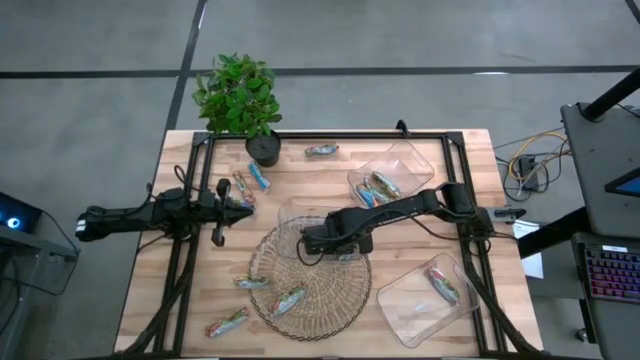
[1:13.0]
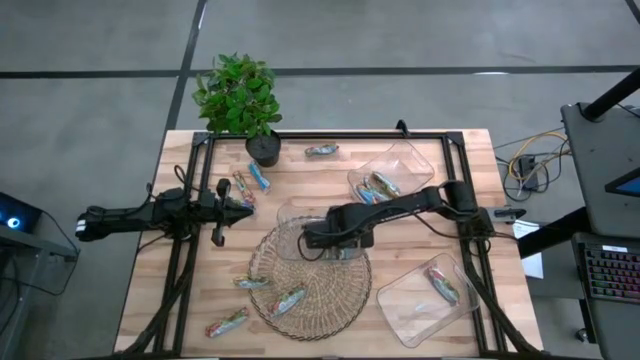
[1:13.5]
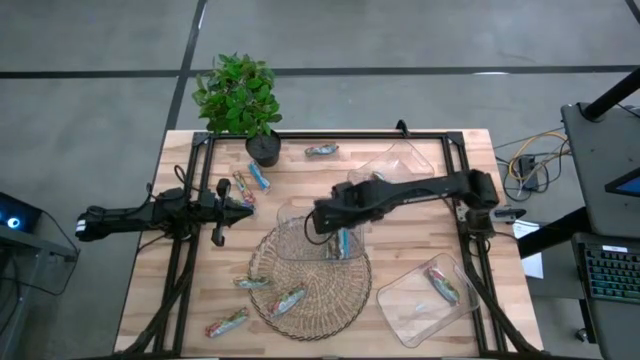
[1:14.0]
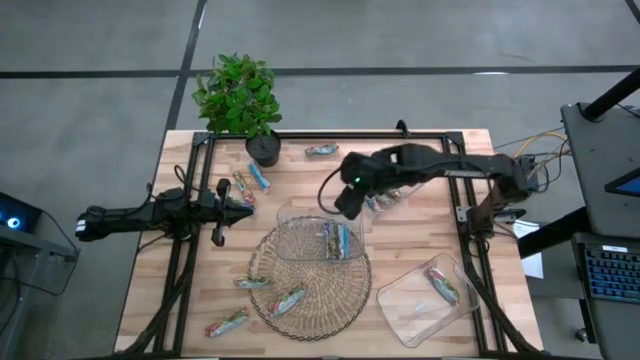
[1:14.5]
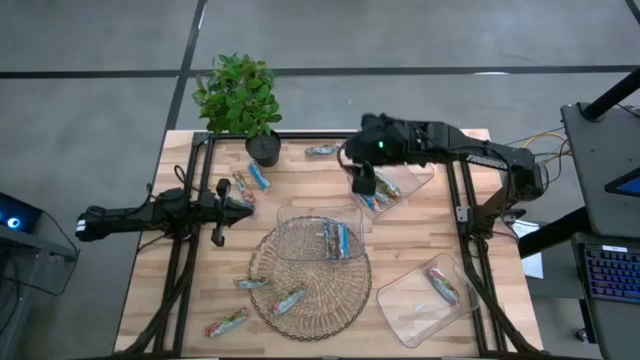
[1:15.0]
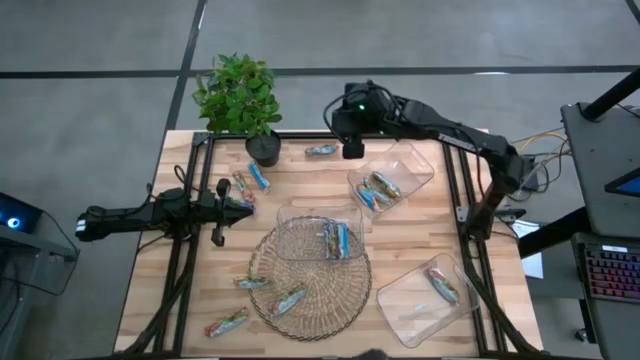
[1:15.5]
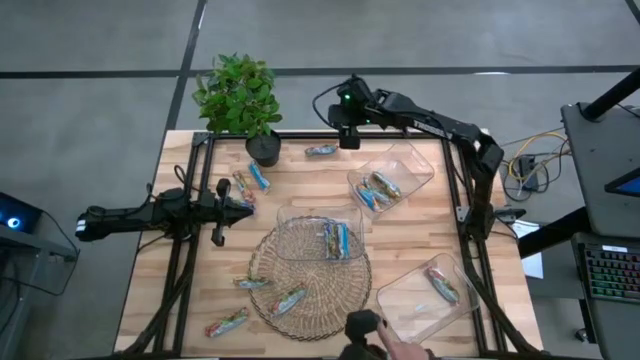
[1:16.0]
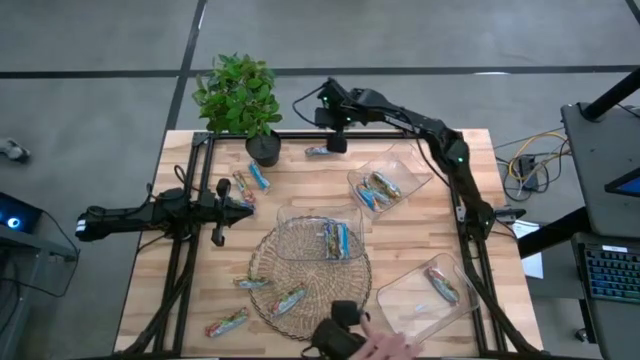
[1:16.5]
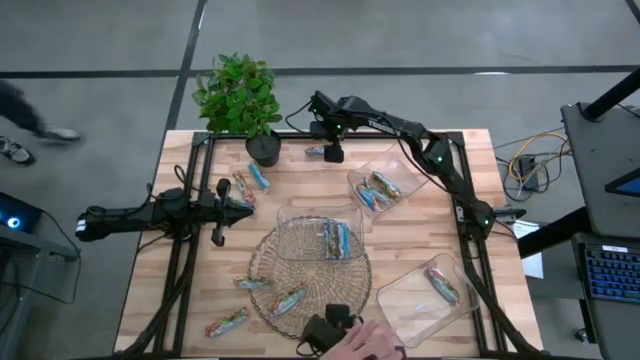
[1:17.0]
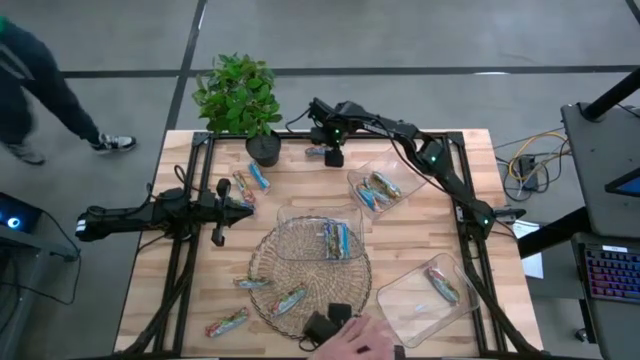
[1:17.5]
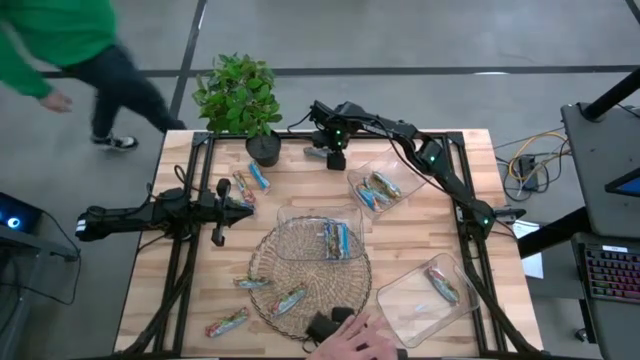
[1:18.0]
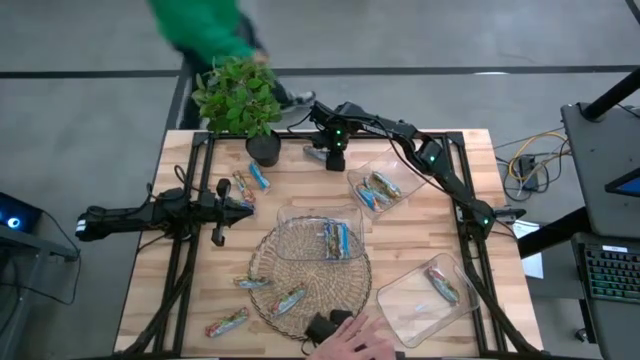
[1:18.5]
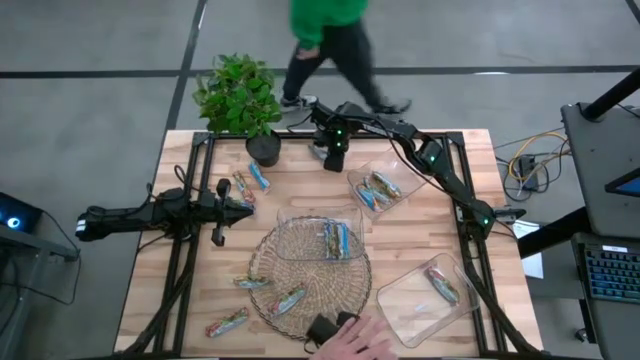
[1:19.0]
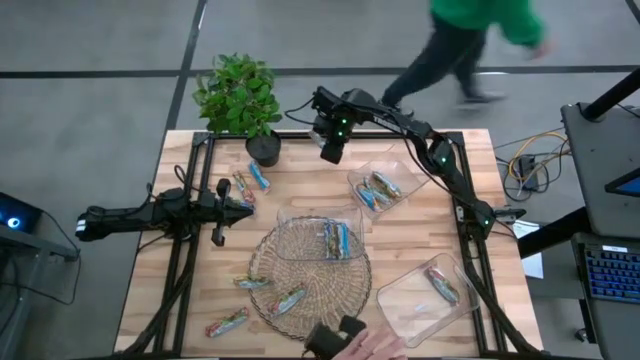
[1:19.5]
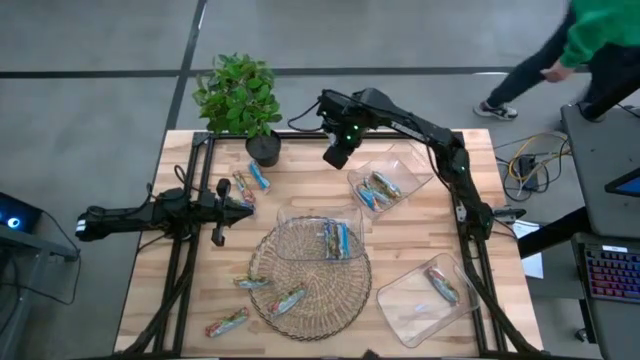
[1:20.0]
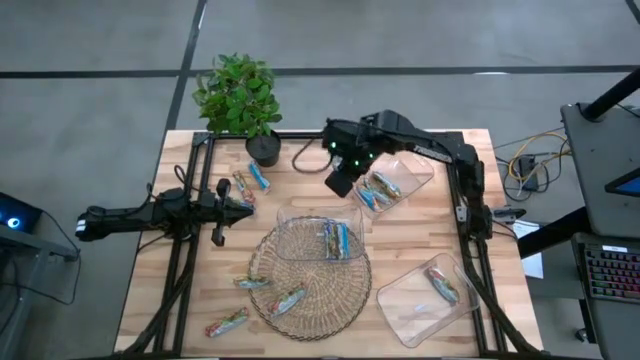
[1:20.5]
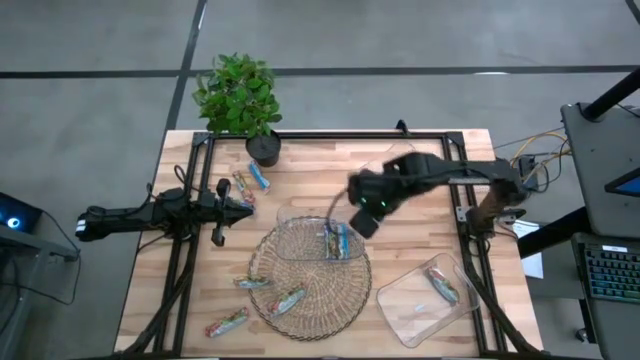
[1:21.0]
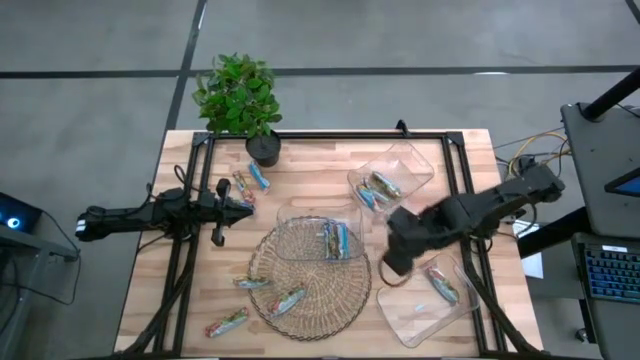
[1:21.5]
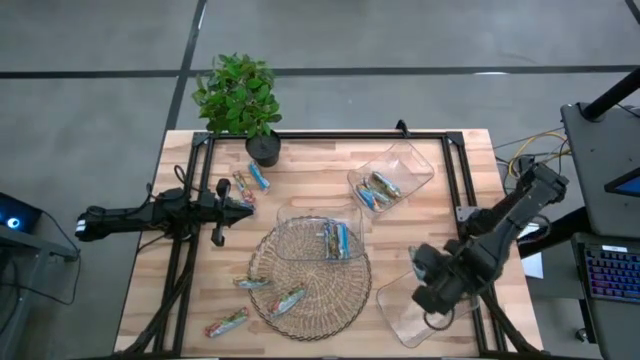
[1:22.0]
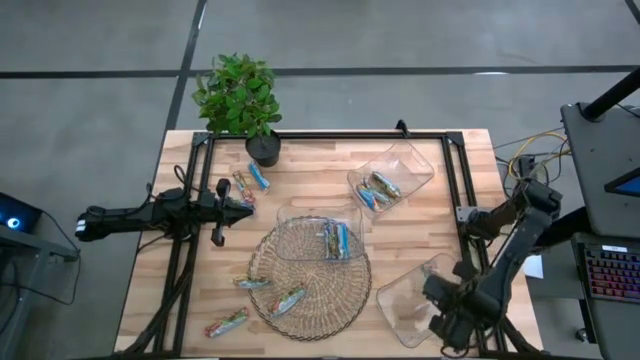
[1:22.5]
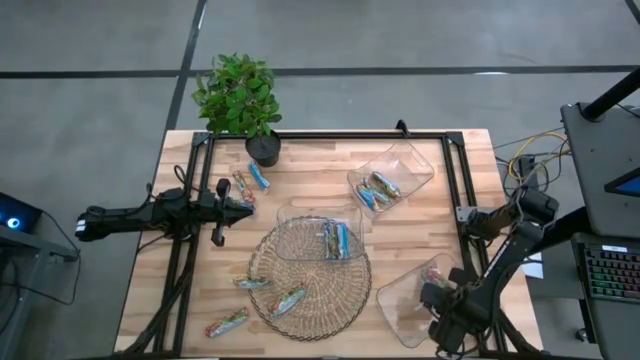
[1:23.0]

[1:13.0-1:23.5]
Task: Pick and place Granola Bars by type
Put the red granola bar into the bottom transparent bin

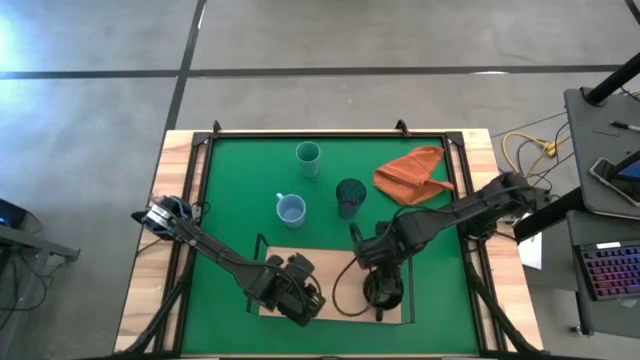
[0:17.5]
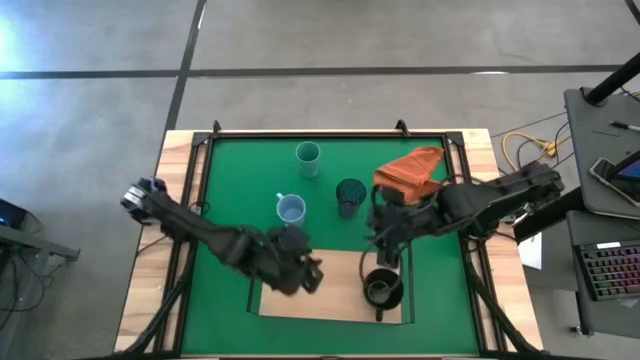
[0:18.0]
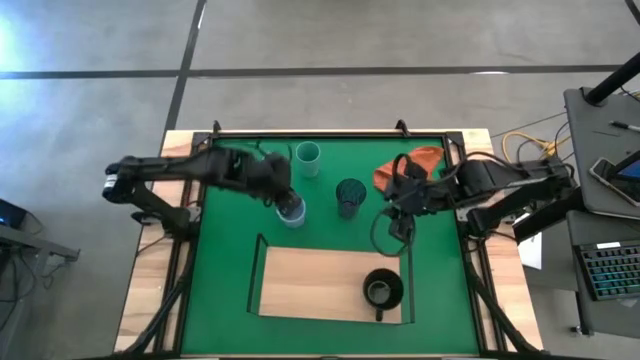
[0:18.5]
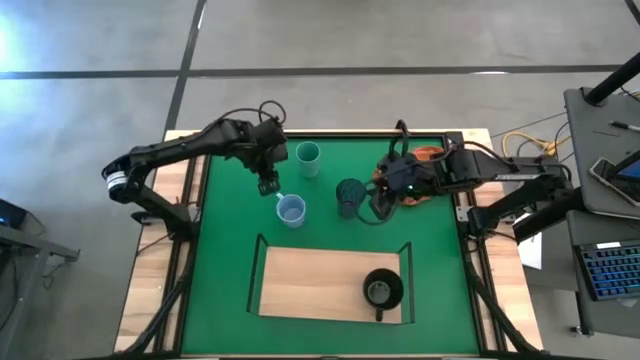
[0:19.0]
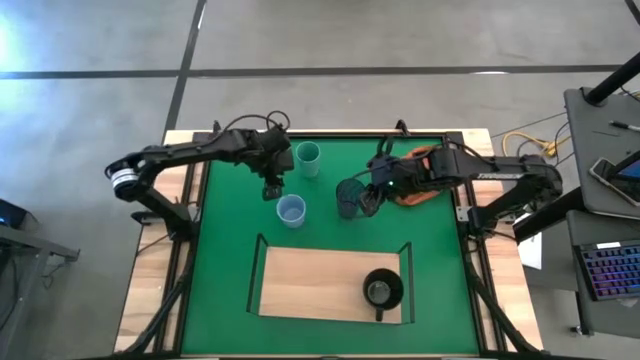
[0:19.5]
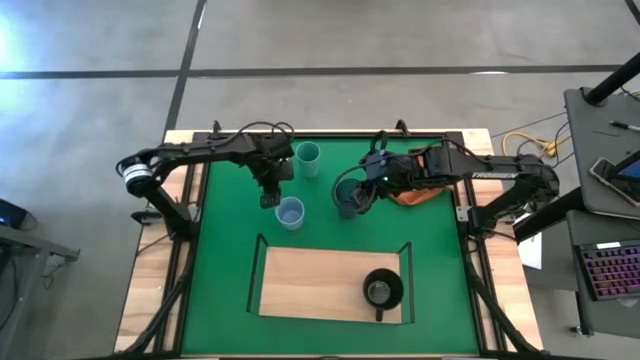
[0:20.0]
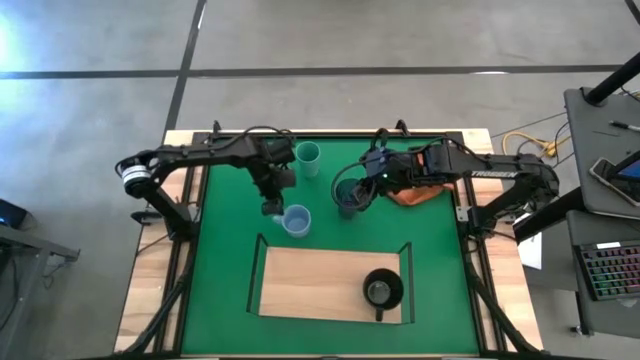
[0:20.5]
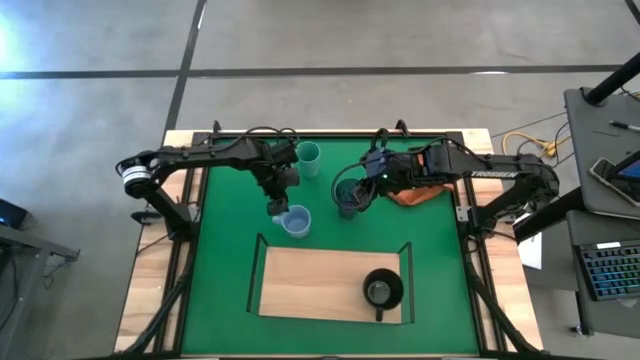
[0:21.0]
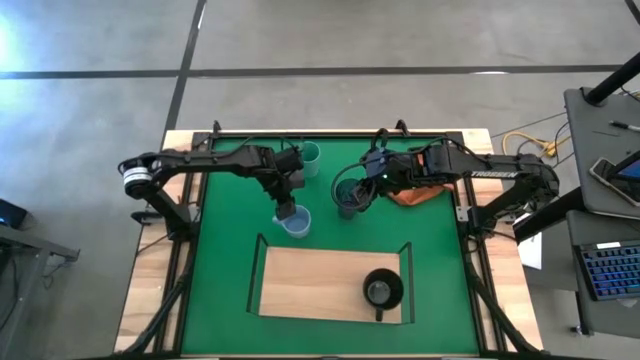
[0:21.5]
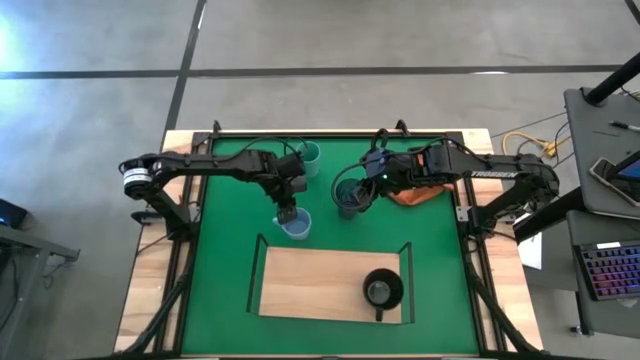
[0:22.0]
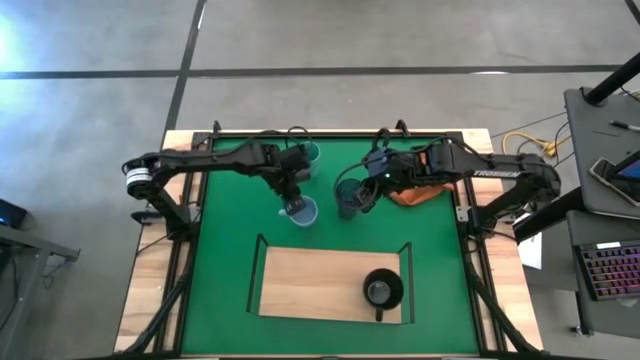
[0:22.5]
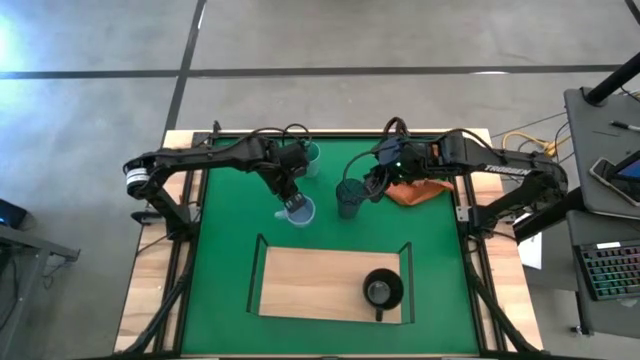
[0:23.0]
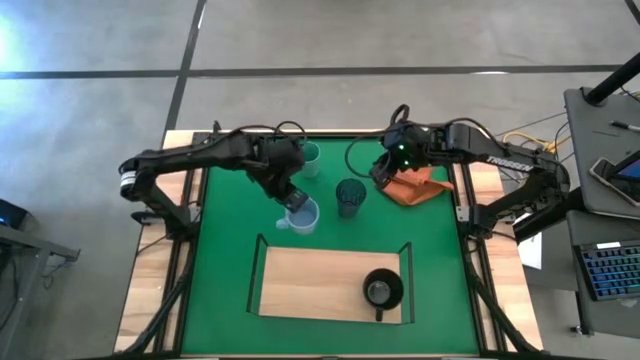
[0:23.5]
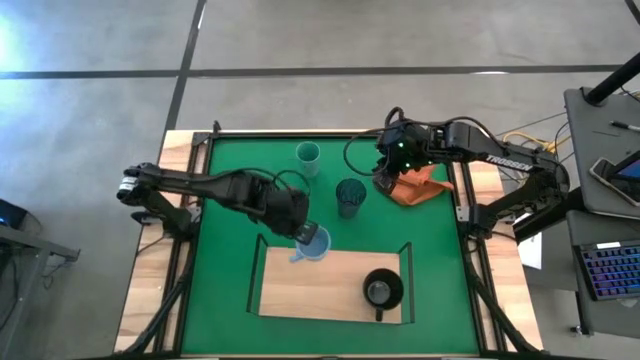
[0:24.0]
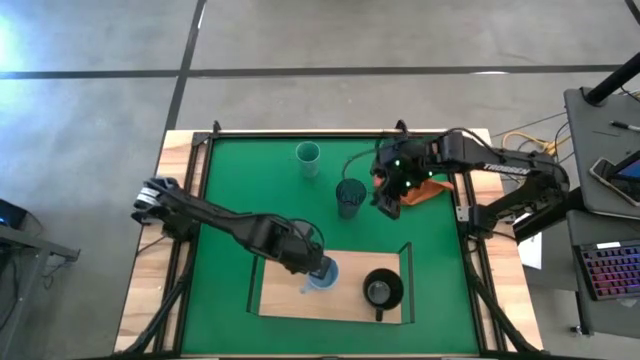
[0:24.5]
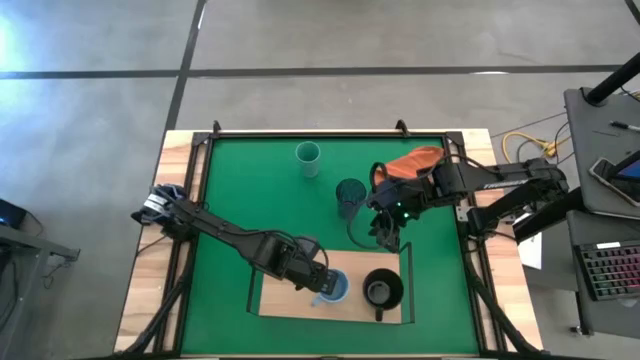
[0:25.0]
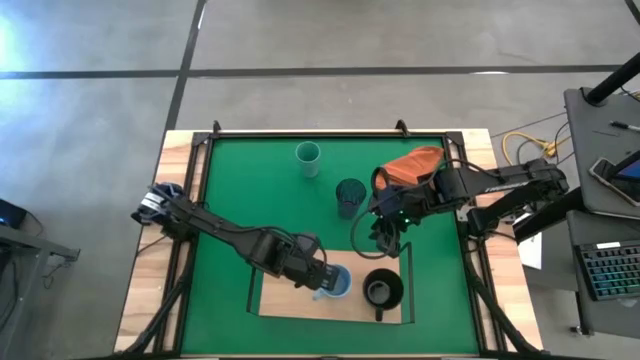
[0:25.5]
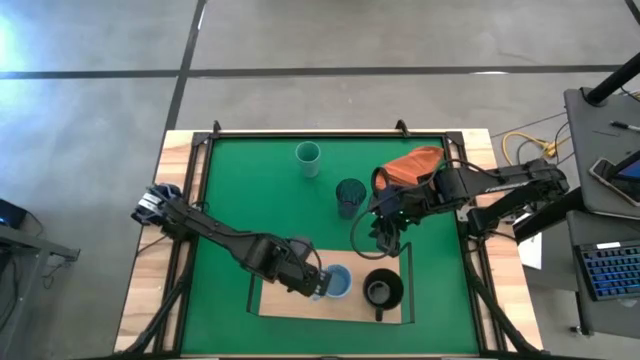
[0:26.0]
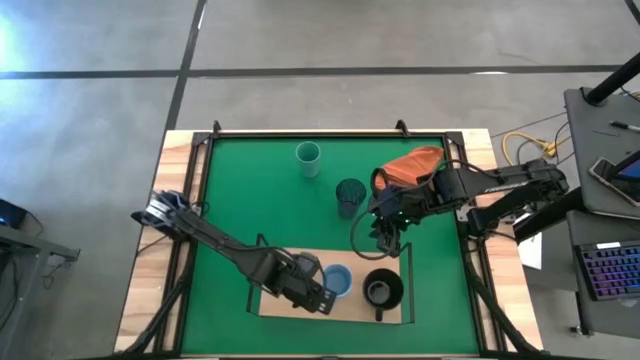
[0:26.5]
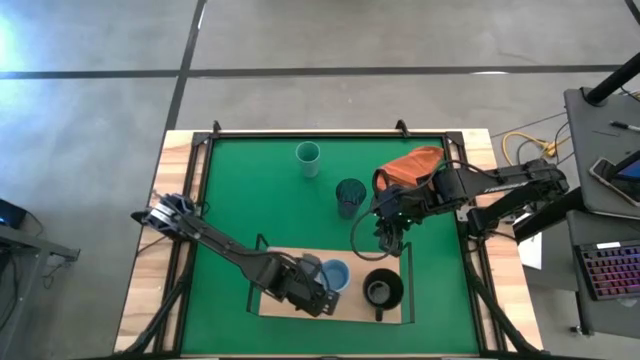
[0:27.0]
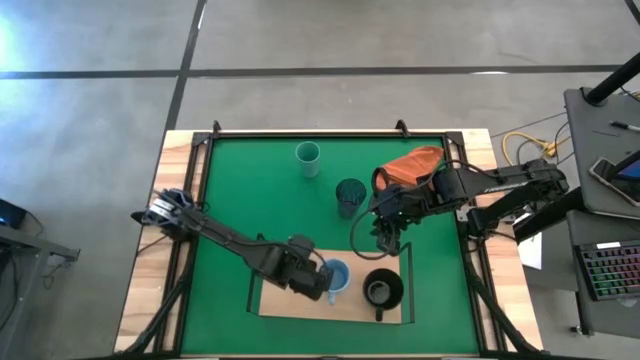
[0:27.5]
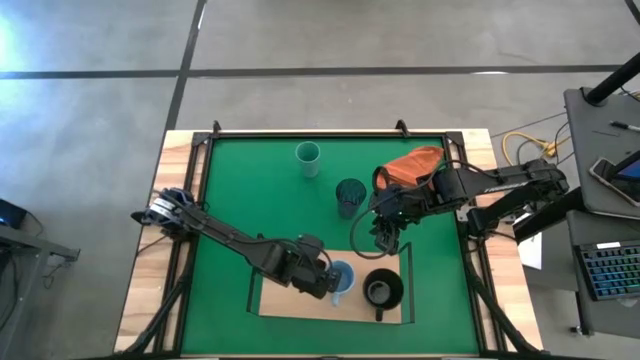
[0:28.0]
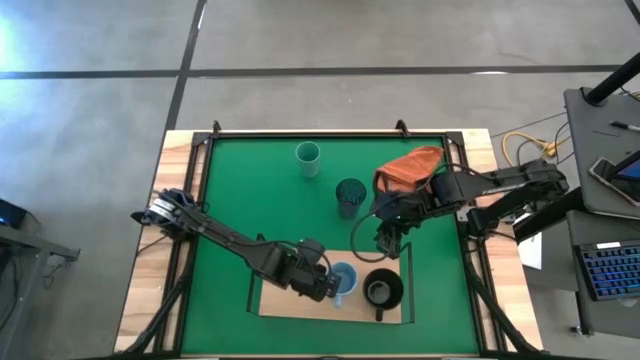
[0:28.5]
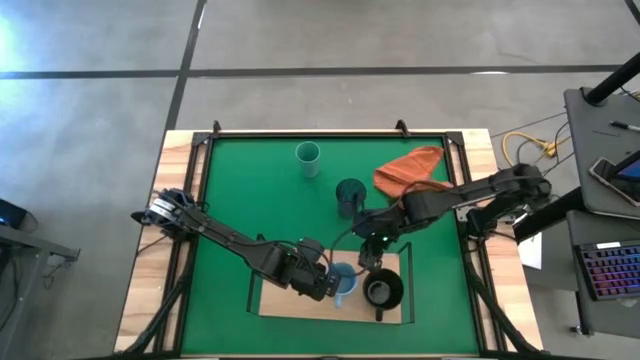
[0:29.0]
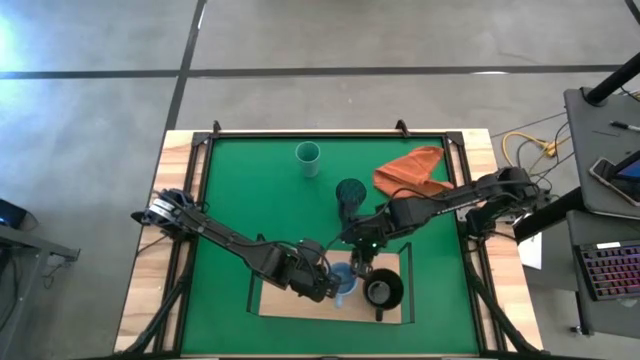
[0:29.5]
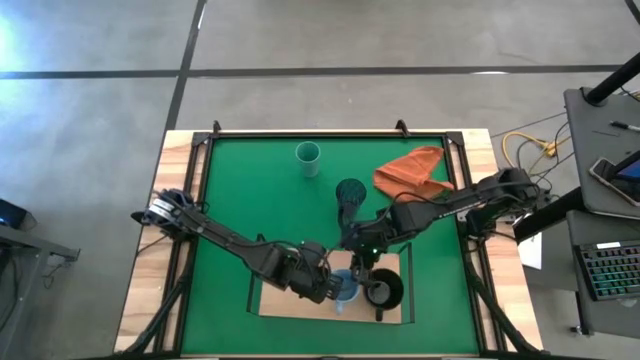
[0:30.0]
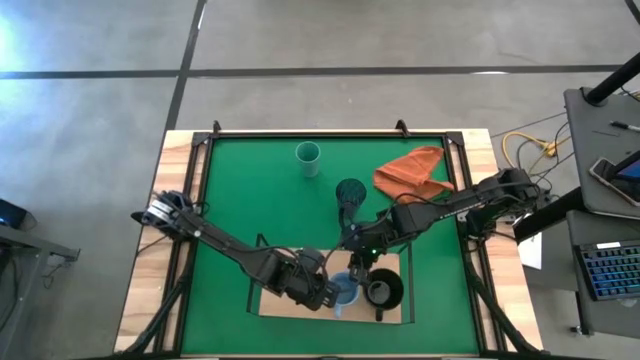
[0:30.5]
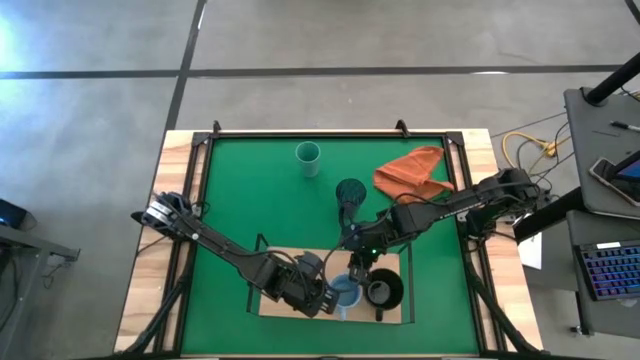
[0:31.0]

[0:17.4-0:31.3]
Task: Stack small to large cups/mugs on shelf
Put the blue mug on the shelf
